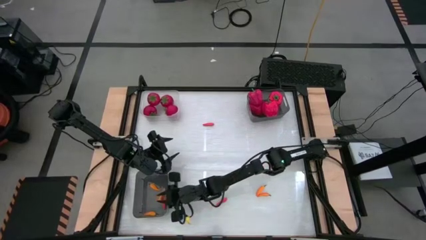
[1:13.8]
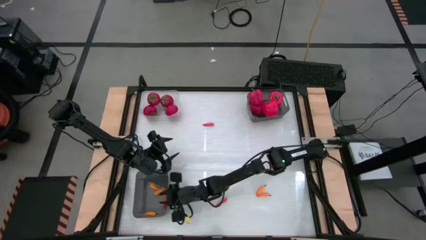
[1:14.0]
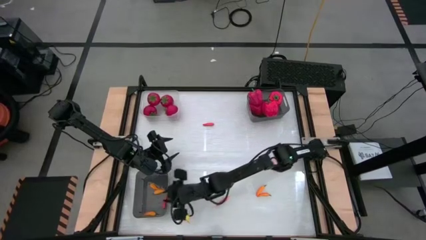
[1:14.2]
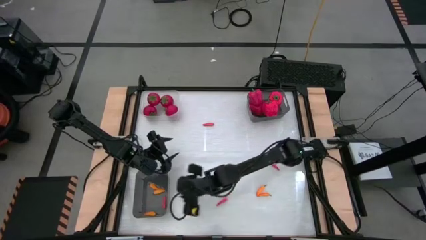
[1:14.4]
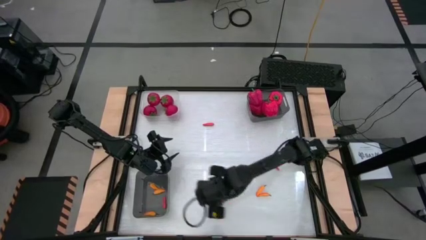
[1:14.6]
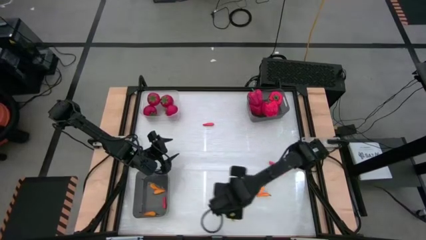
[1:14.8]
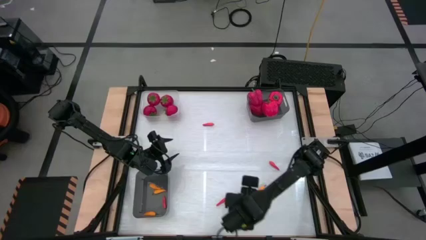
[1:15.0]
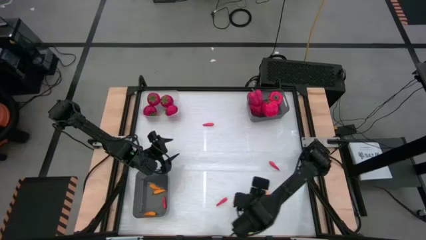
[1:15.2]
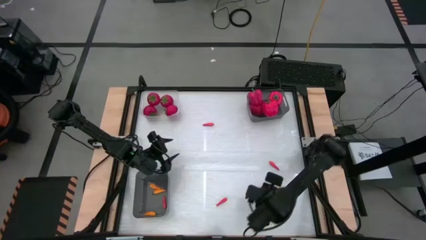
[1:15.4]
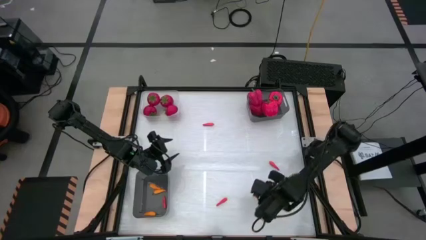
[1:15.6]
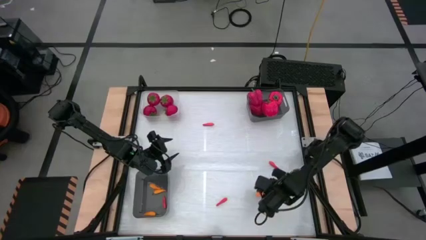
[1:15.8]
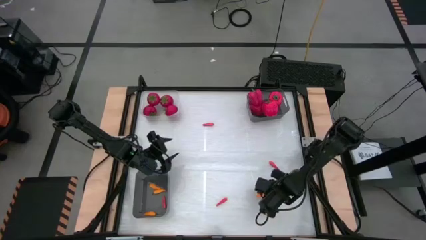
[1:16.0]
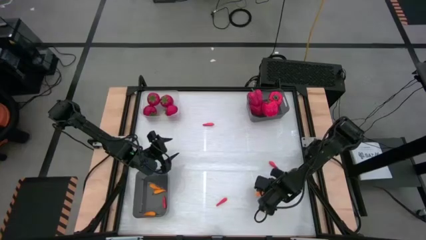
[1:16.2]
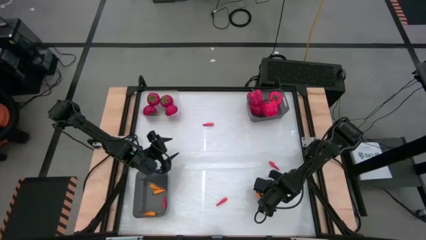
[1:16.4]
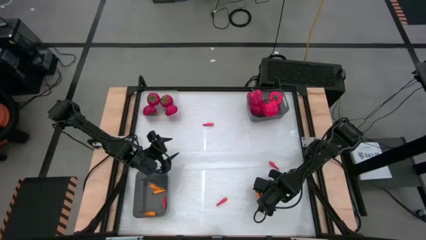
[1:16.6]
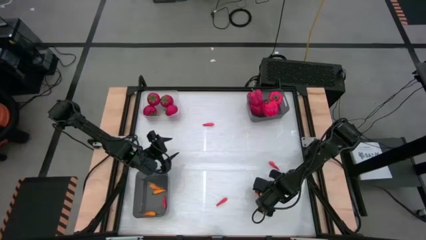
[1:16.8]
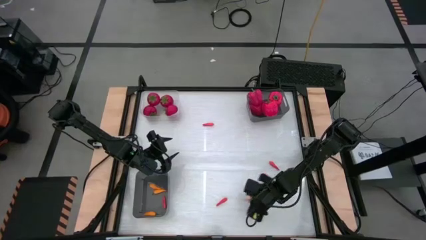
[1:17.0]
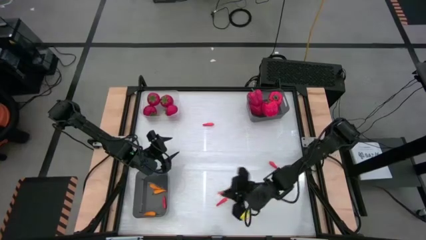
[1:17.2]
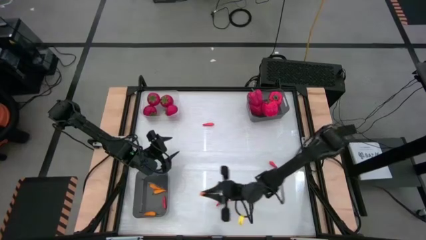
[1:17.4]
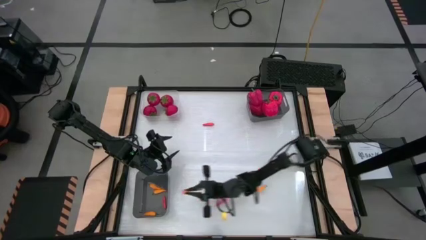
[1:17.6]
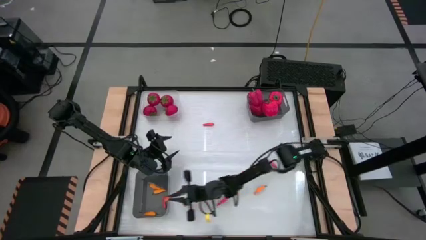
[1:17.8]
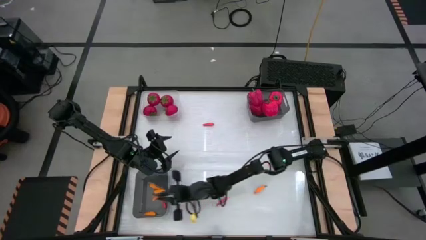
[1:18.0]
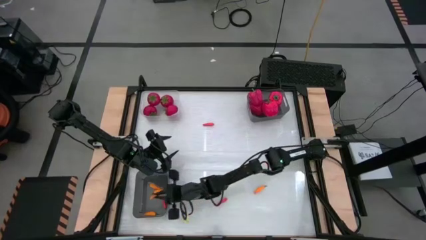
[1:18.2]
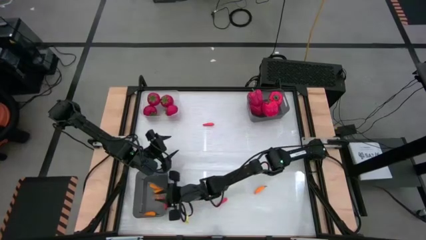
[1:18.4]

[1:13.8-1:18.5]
Task: Sort produce into baskets
Put the yellow chili pepper into the bottom black bin

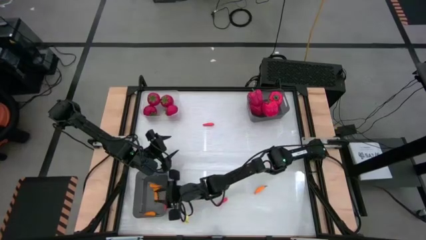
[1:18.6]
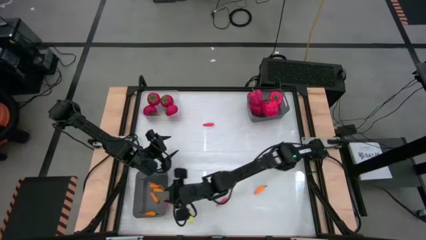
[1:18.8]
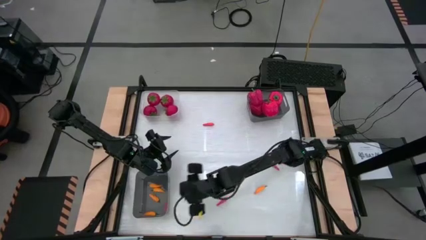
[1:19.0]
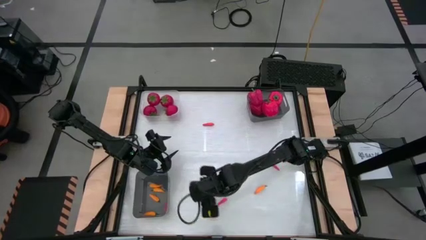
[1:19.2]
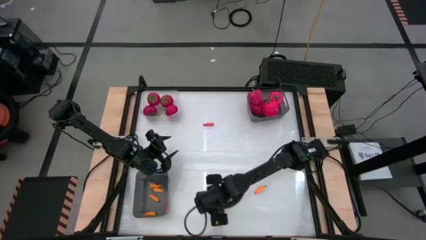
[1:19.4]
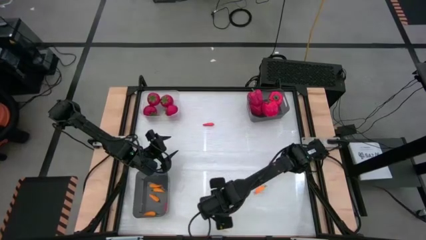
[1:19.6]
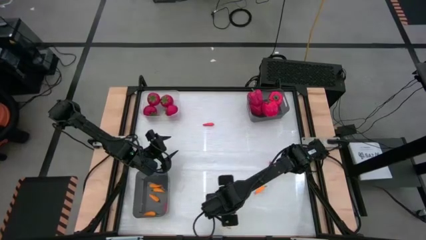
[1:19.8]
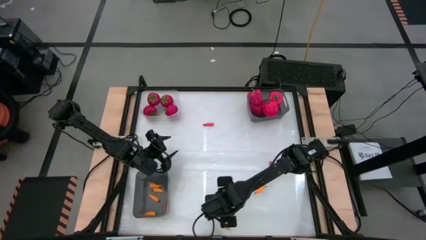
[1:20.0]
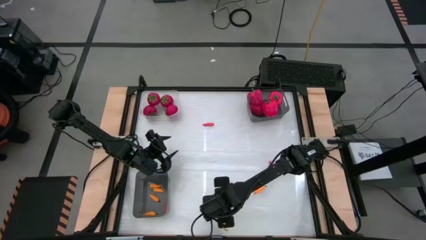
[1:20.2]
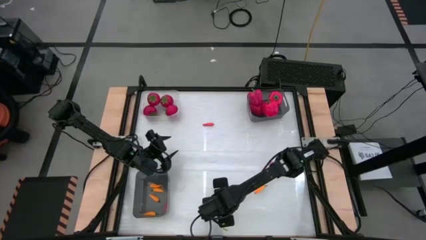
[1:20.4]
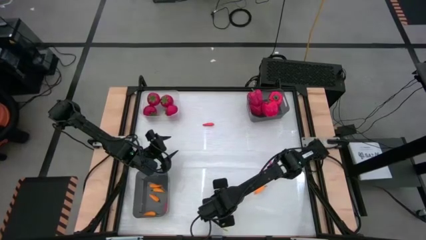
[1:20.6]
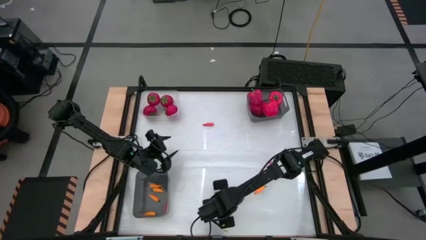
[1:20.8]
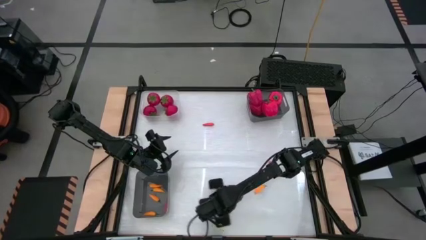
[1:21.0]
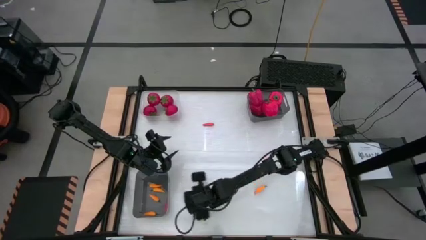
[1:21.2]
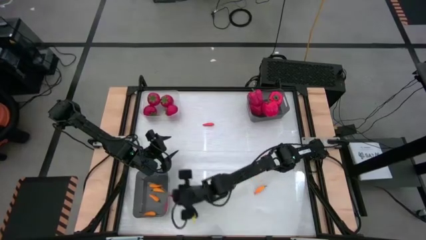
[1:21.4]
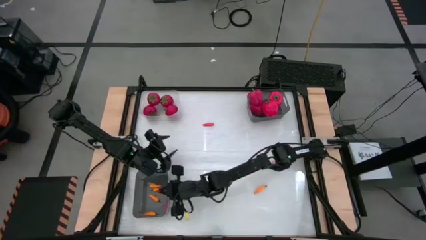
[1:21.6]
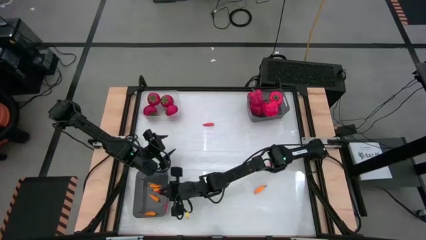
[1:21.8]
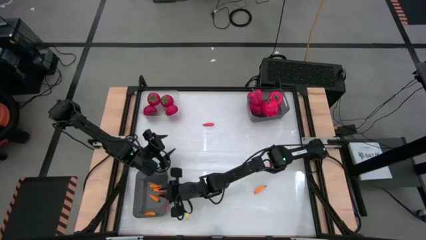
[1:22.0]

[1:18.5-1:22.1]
Put the orange chili pepper into the bottom black bin

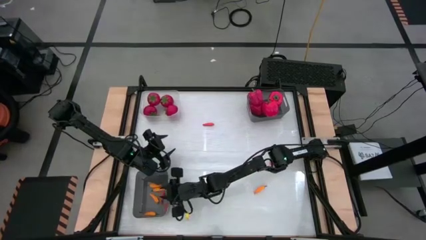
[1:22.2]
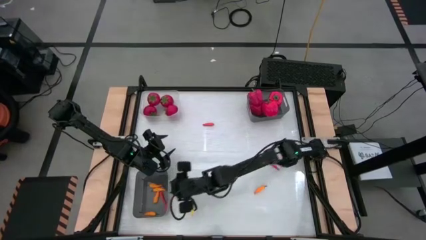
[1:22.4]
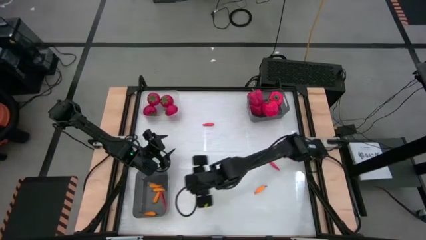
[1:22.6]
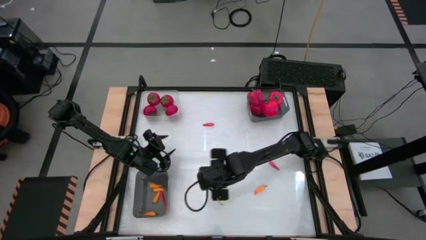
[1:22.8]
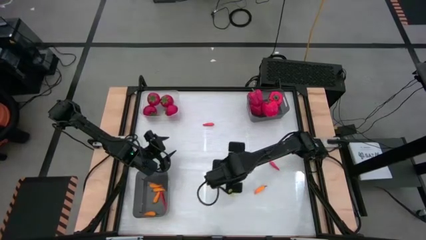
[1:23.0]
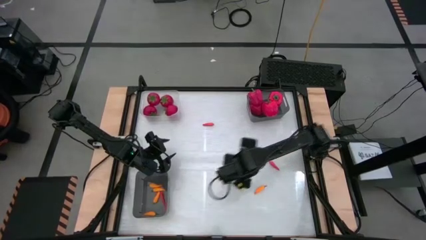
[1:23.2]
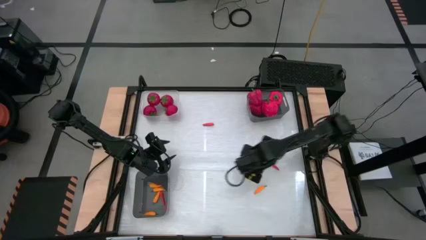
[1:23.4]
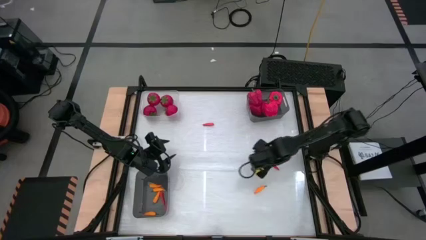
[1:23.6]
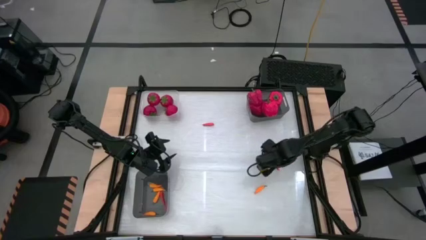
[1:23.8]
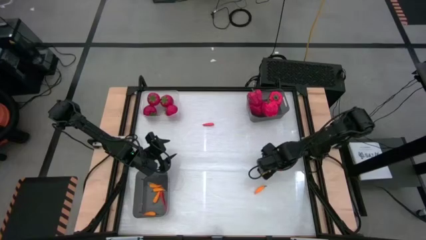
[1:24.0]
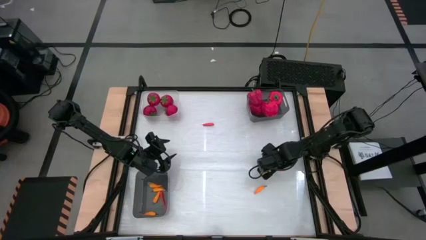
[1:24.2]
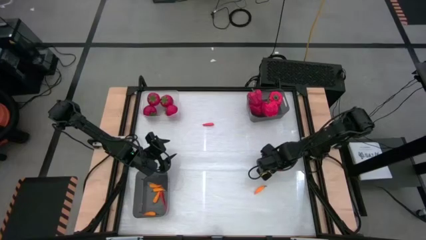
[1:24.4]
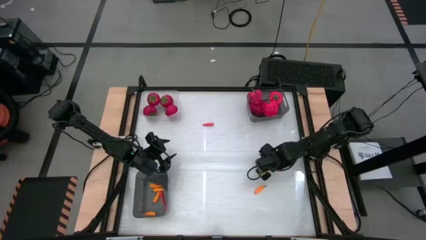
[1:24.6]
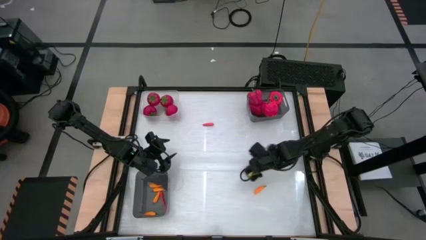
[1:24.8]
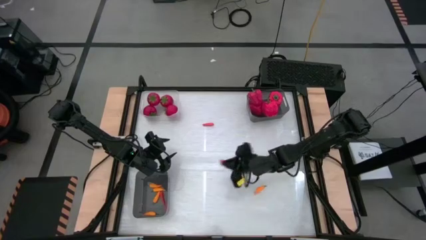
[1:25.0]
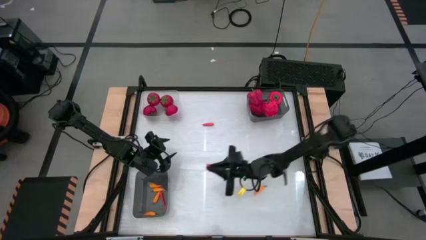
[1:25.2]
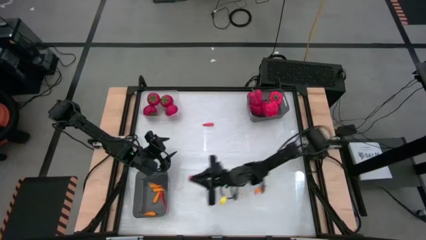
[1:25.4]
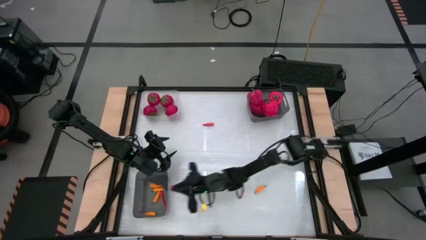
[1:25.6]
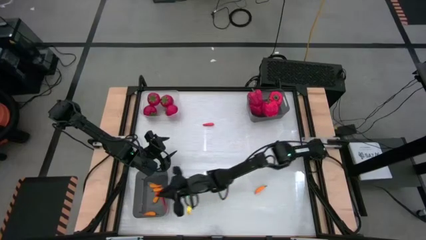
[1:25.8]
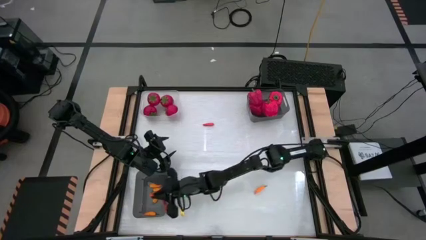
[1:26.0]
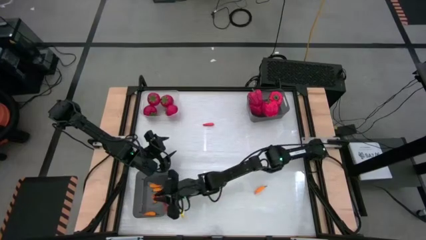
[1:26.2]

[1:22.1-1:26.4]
Put the orange chili pepper into the bottom black bin

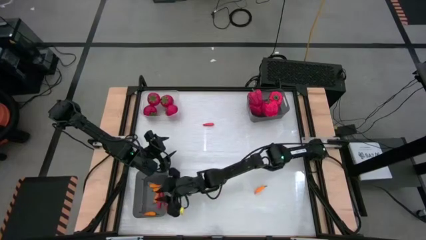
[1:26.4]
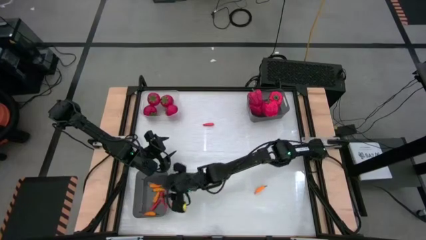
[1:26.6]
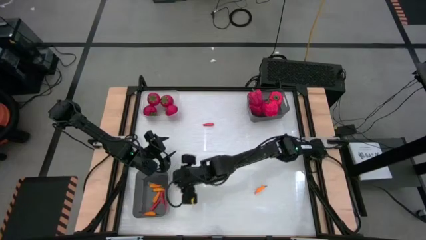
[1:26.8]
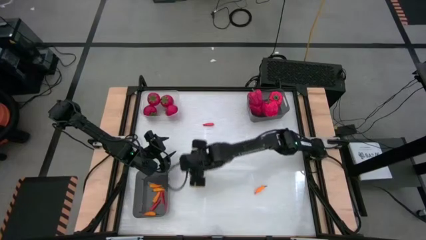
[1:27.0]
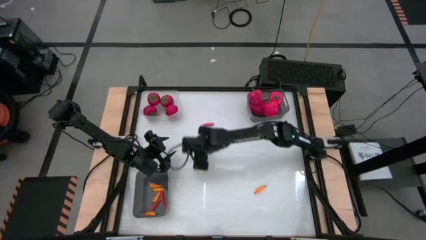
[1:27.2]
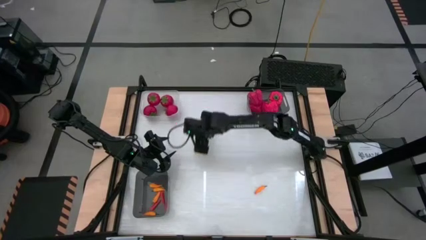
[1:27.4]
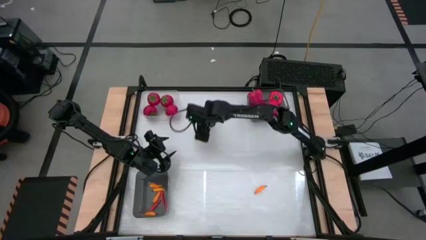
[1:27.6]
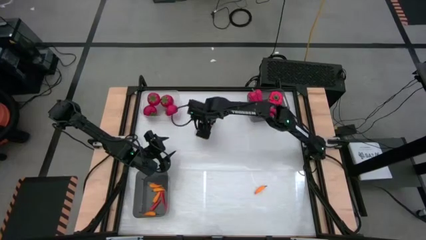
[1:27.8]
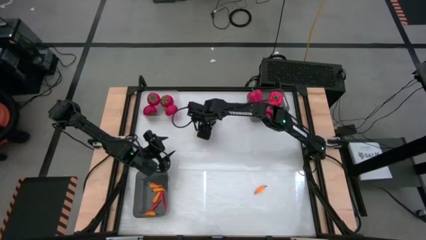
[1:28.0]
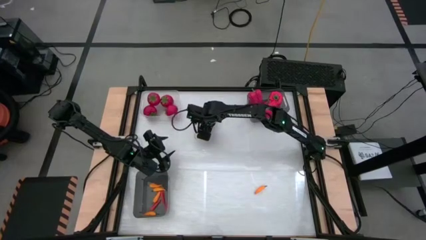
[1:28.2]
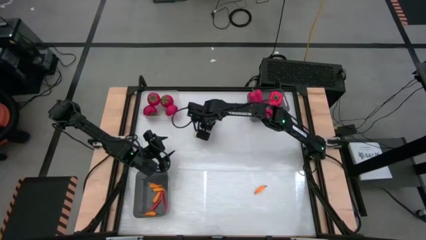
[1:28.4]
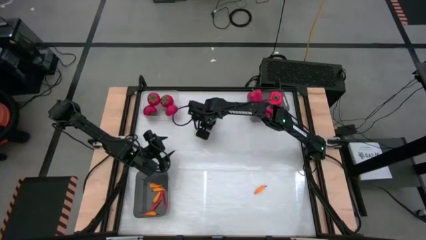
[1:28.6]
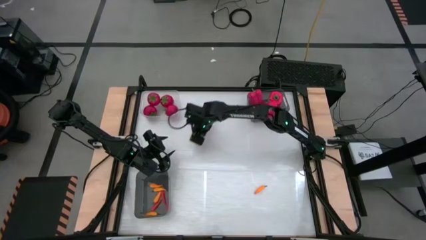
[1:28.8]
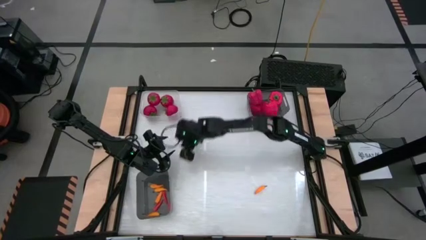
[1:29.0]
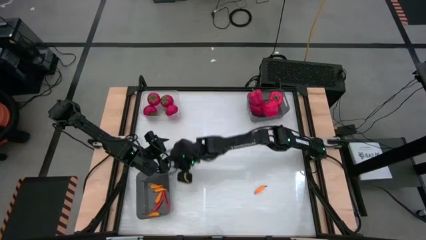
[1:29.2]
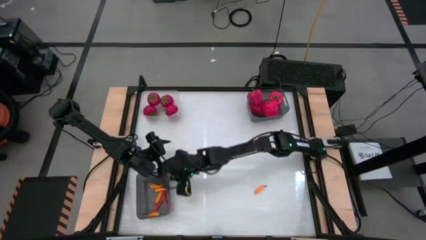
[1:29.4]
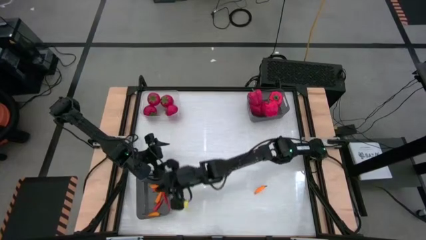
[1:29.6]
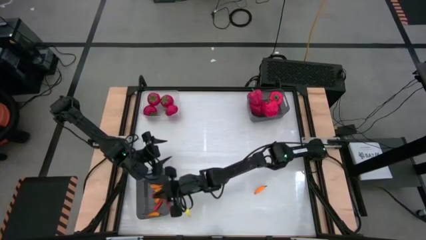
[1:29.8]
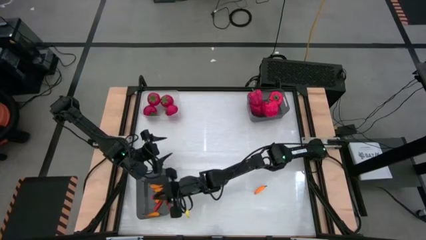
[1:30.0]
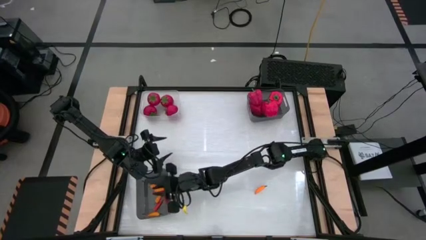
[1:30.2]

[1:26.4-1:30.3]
Put the orange chili pepper into the bottom black bin
